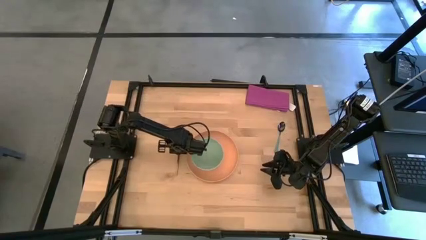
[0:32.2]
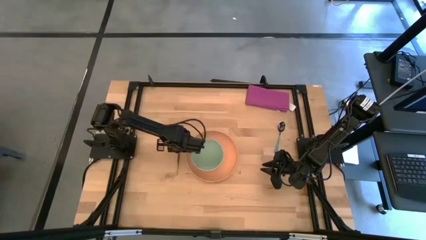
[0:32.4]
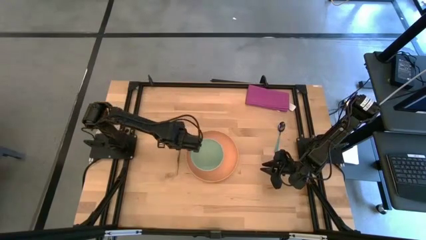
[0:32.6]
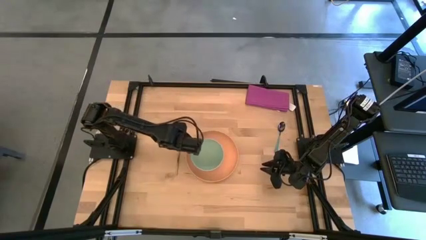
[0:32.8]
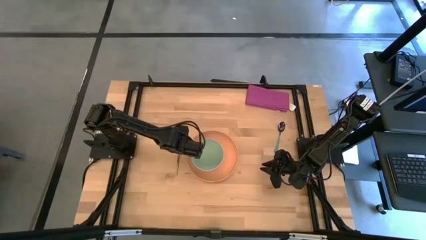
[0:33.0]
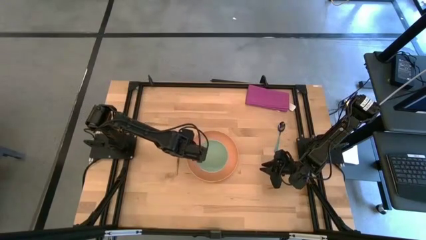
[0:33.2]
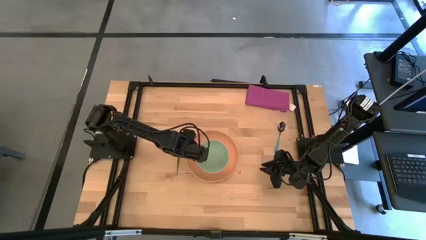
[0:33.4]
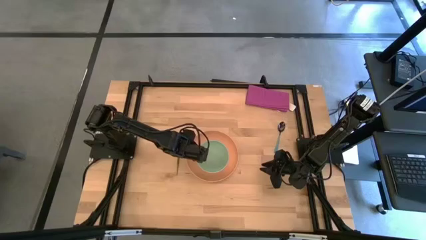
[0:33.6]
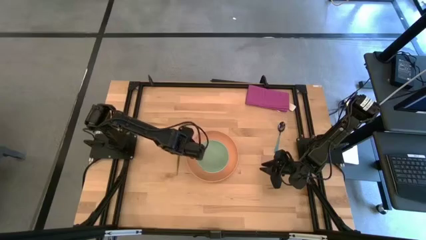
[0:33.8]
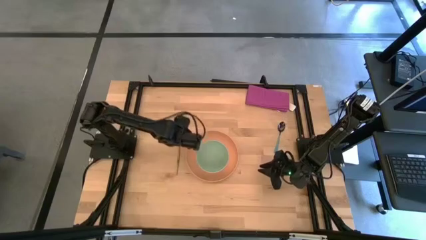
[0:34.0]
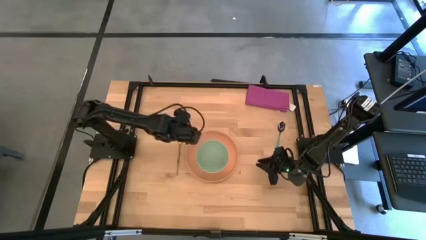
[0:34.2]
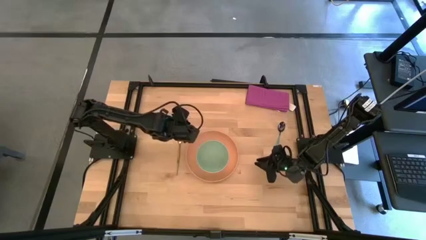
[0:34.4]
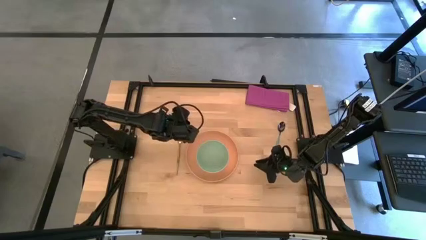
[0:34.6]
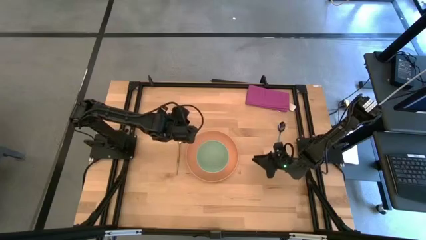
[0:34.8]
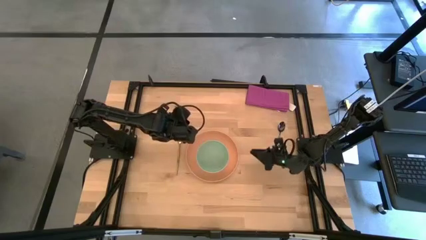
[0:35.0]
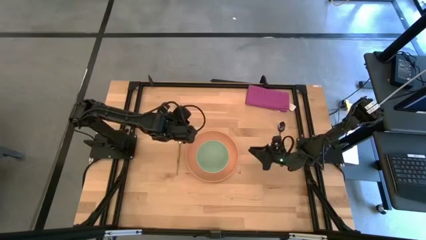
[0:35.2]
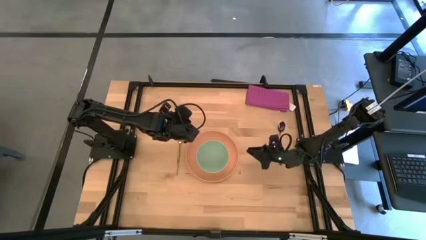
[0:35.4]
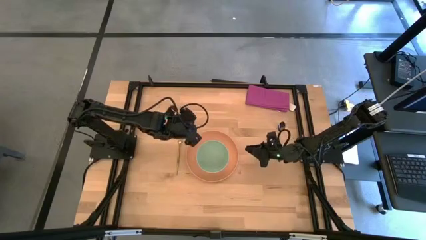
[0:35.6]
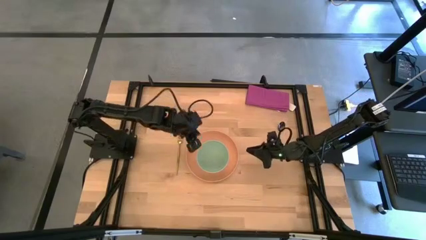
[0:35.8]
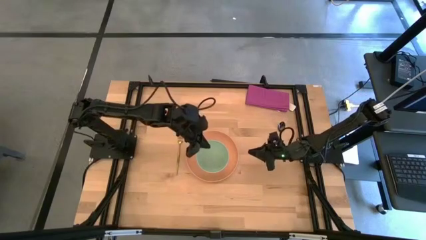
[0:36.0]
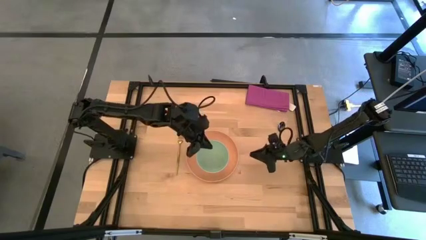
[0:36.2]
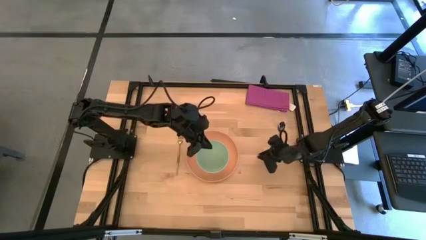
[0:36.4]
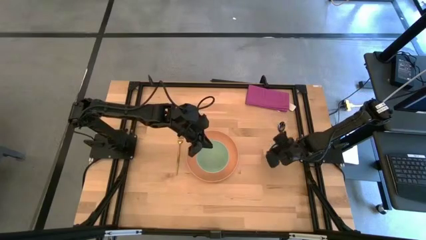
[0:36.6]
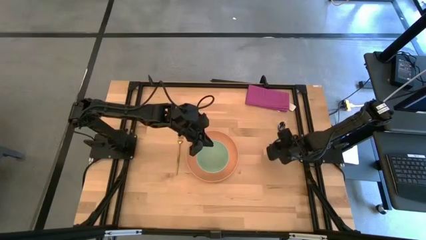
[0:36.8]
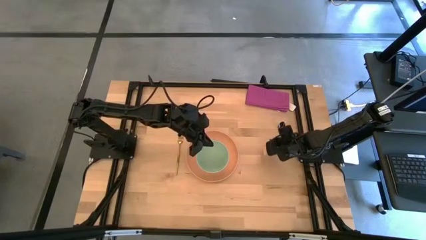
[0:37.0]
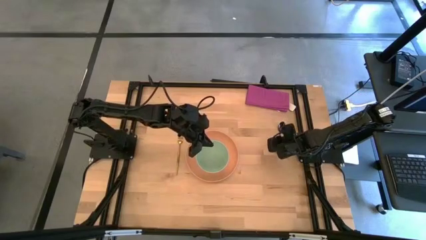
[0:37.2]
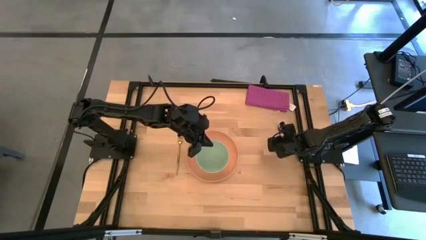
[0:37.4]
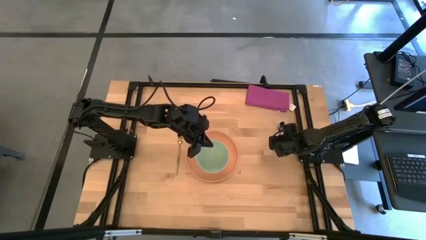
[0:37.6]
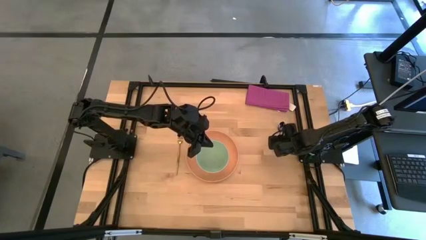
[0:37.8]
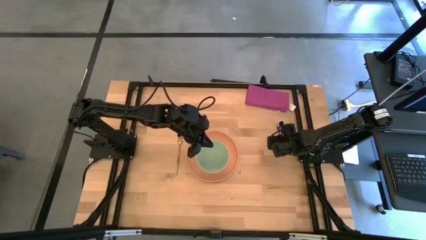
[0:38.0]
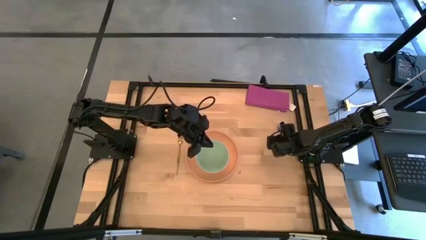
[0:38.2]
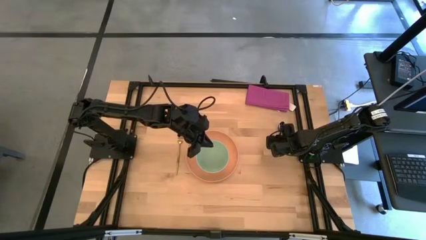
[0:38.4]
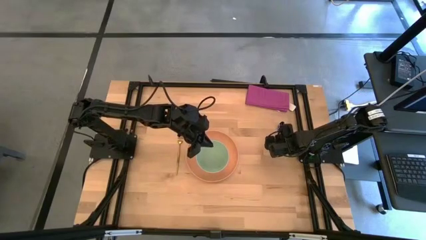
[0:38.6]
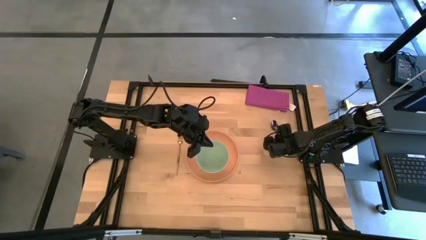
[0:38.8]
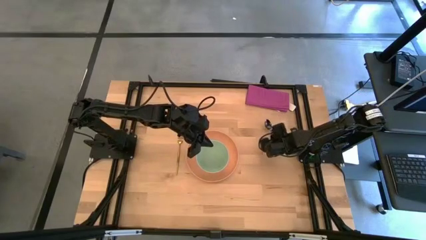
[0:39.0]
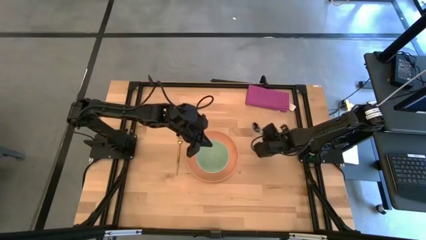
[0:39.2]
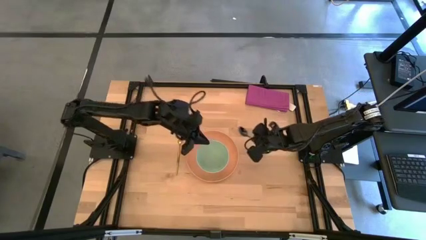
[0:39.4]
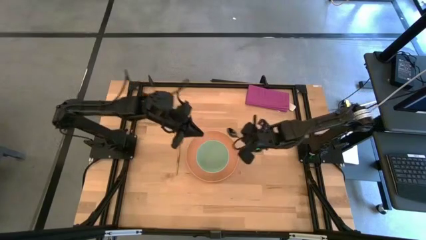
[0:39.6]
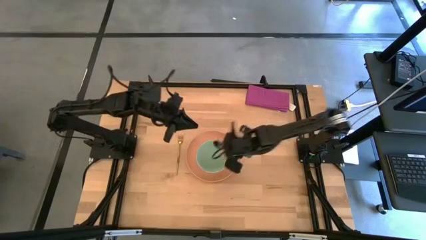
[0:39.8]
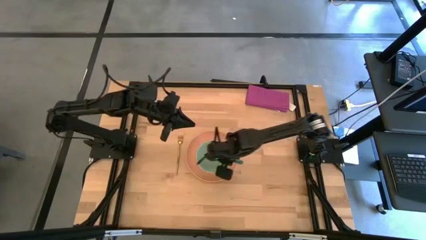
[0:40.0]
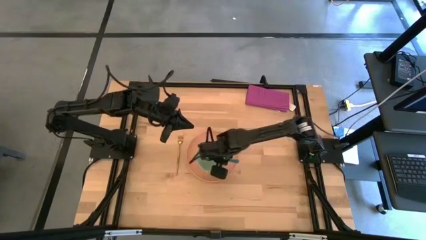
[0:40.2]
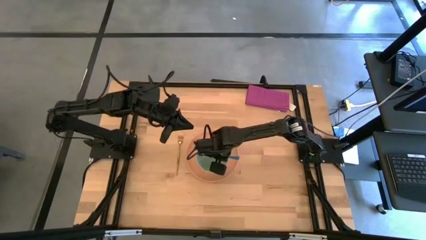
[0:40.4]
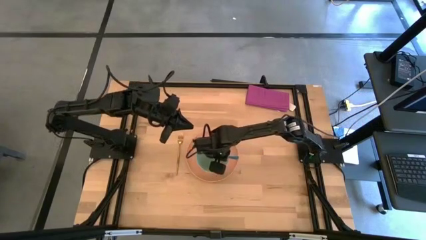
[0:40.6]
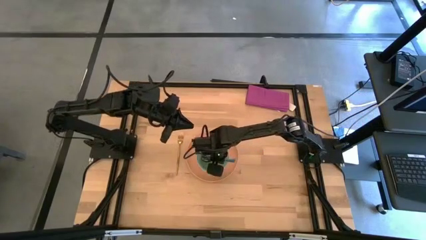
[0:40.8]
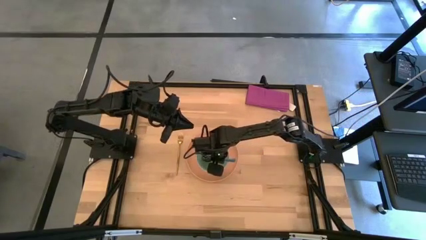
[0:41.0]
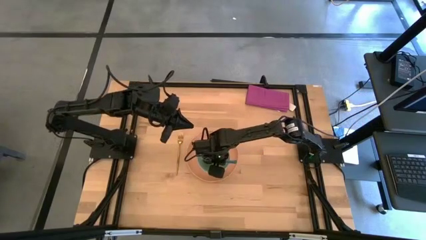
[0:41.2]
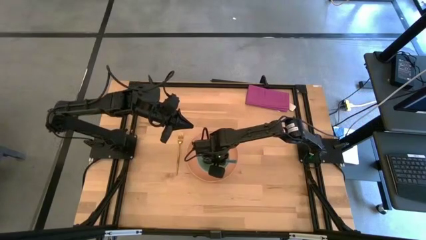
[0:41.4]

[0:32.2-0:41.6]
Task: Set table place
Put the black and blue spoon into the green bowl

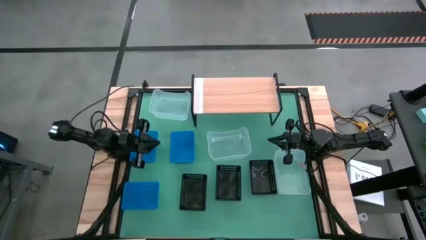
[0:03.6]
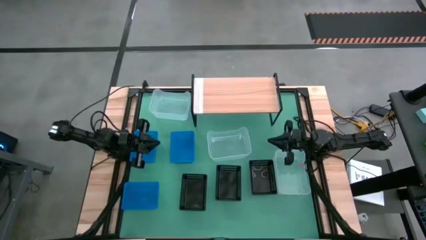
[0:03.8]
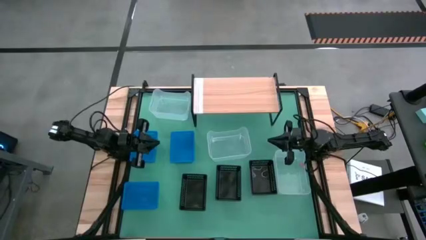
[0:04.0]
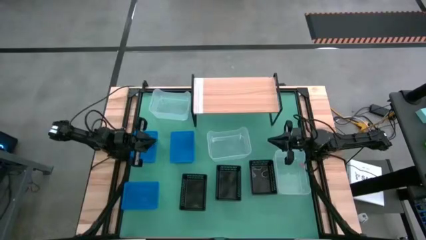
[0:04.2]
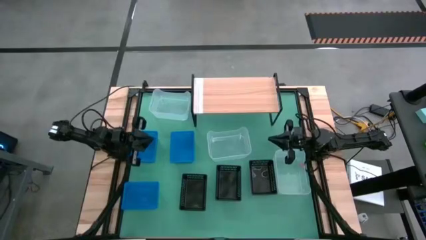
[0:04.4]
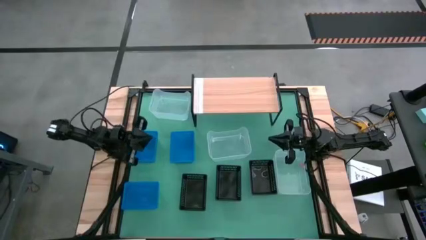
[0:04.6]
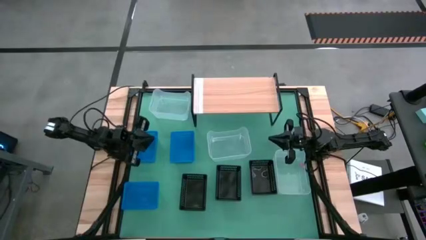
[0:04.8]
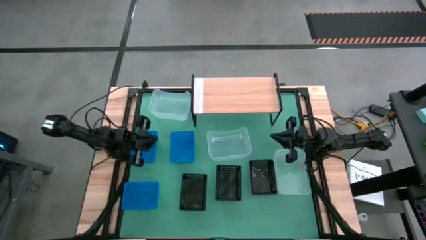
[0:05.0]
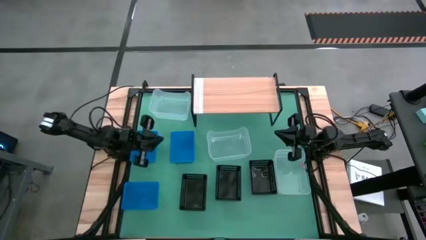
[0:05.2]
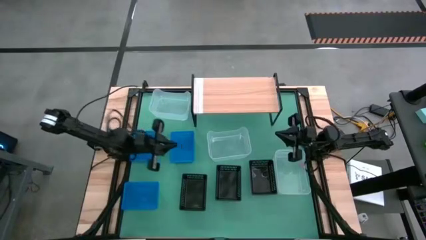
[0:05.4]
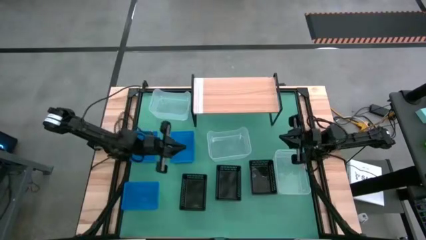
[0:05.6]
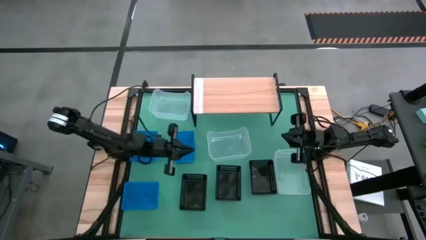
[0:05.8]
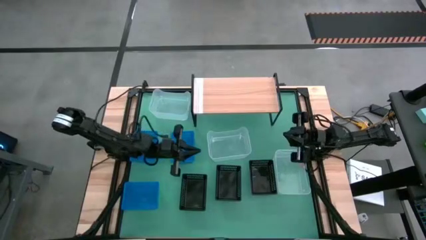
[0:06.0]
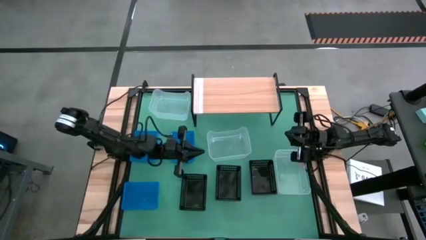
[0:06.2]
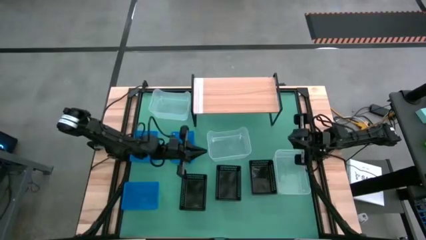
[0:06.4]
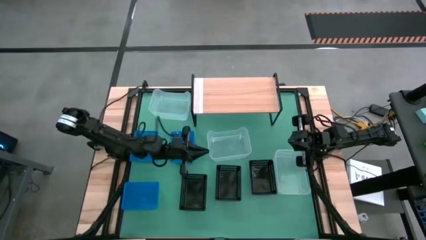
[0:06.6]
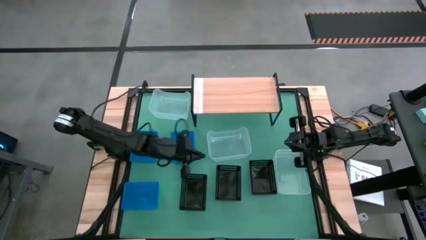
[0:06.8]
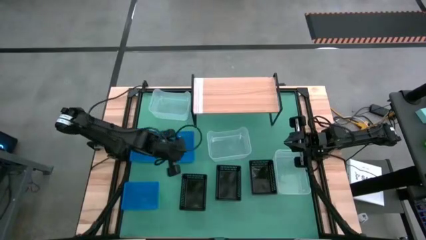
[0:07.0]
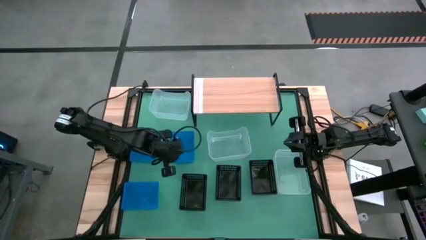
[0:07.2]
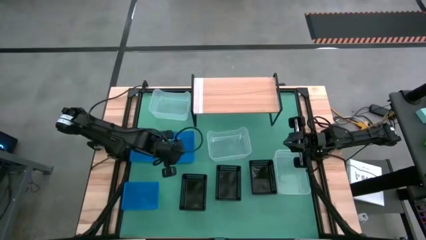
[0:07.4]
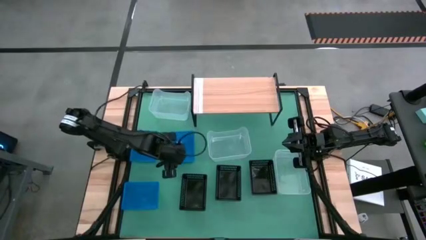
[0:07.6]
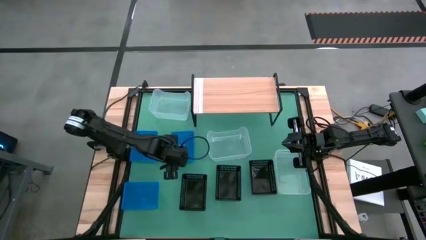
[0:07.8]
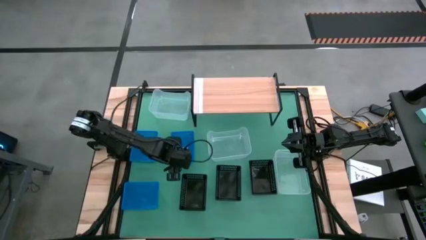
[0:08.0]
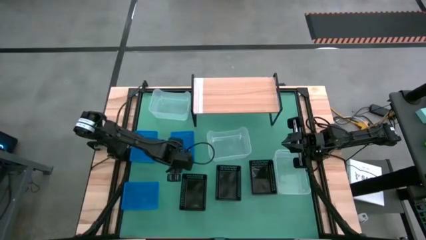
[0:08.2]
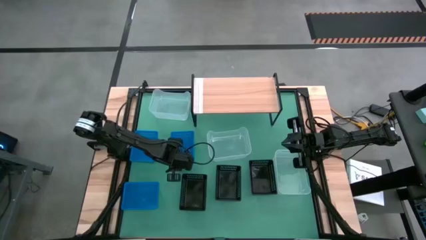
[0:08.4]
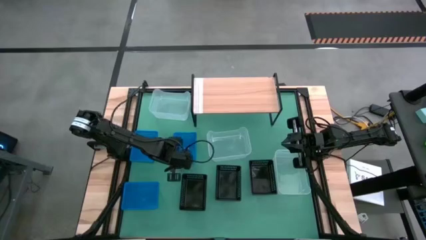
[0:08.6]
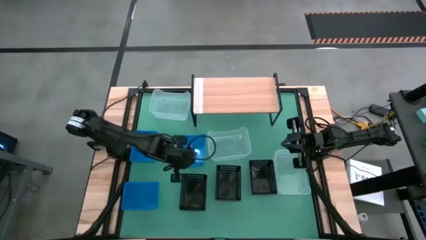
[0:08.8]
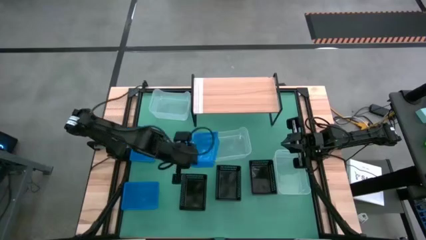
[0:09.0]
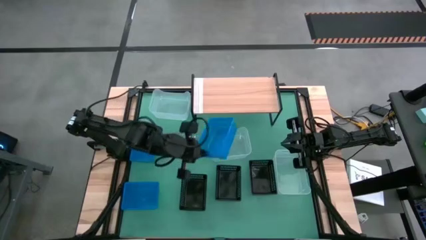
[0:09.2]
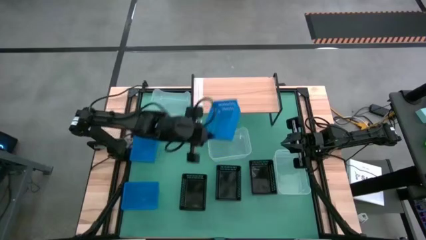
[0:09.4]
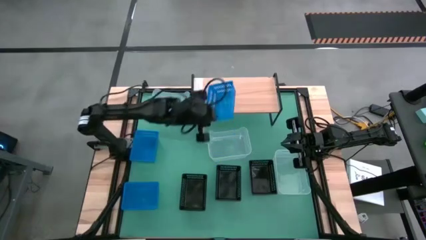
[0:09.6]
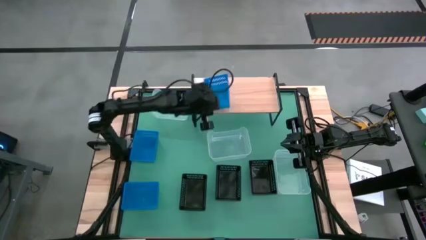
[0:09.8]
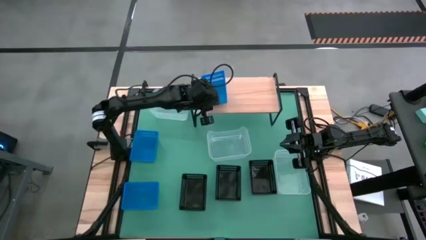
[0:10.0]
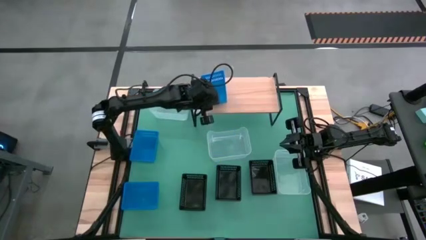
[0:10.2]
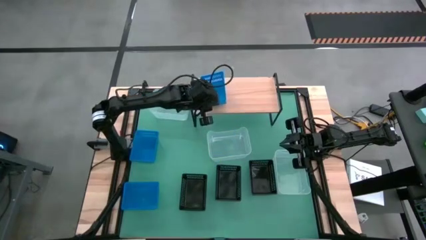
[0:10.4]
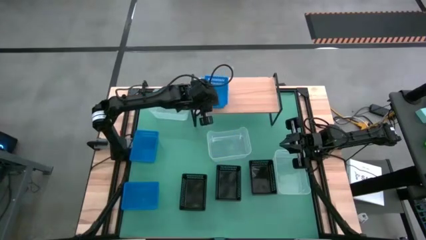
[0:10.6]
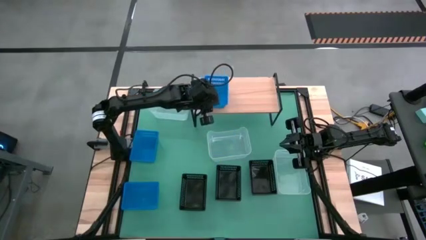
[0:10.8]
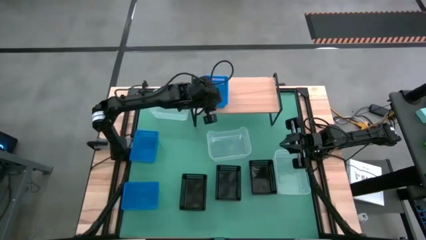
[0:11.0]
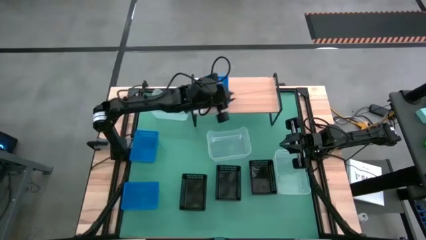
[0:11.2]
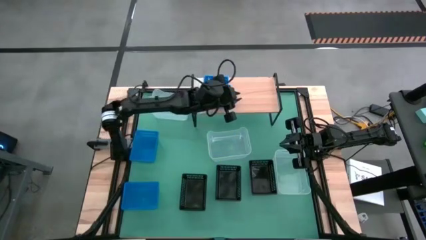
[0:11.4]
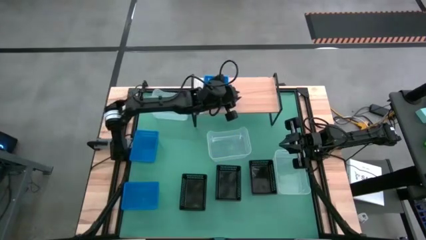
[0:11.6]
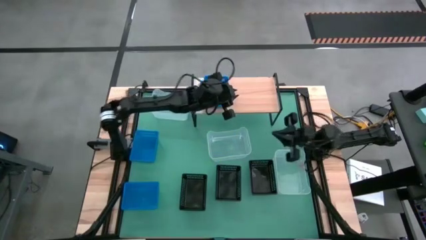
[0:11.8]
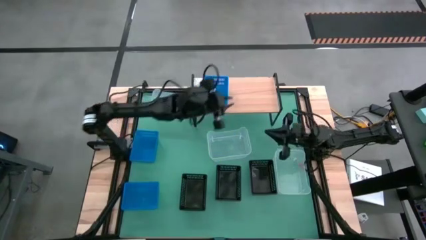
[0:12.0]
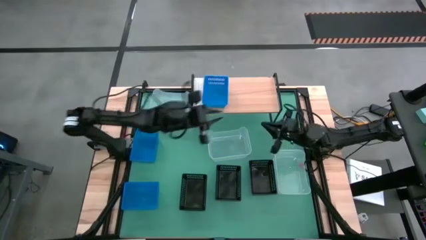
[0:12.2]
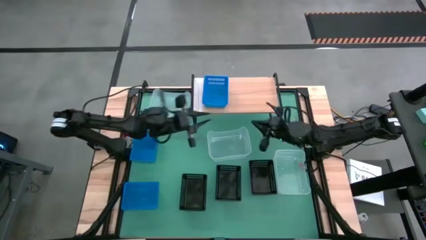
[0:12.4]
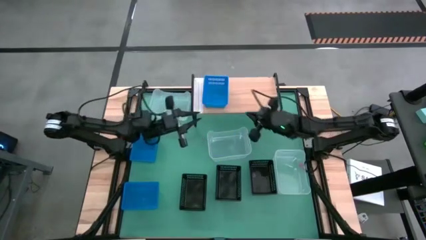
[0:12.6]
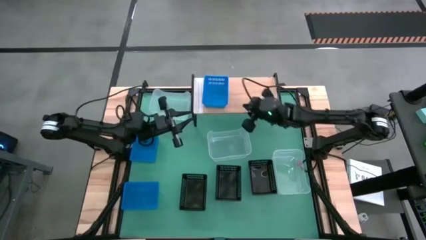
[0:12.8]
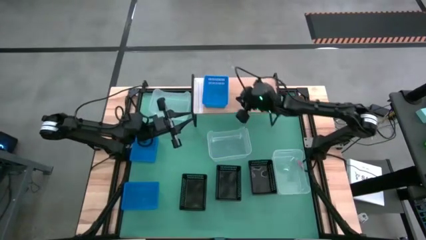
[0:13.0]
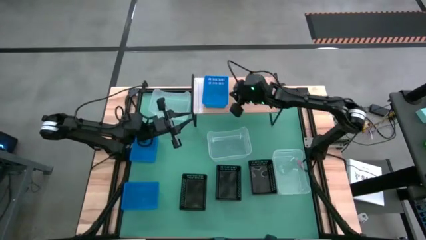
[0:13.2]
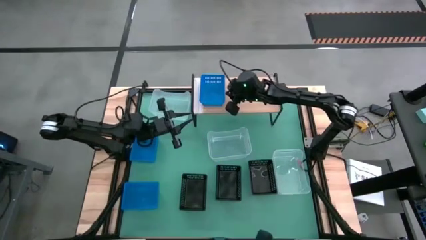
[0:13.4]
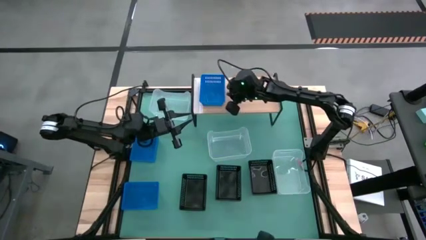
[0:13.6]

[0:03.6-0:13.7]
Task: Stack baskets on shelf by color
Put the top right blue bin on the shelf
